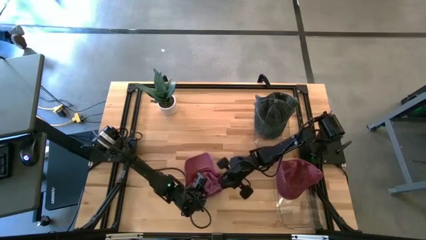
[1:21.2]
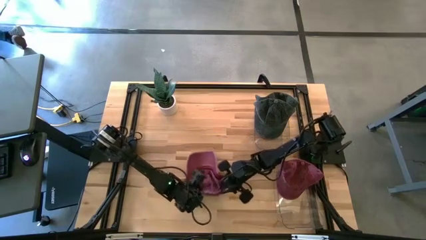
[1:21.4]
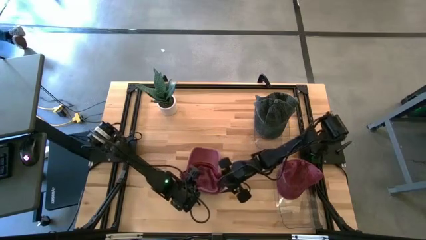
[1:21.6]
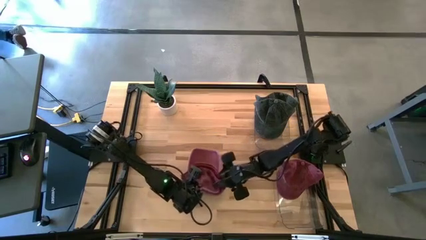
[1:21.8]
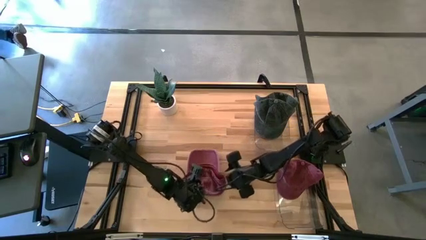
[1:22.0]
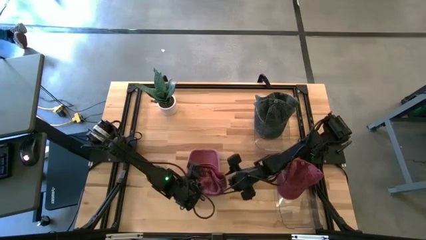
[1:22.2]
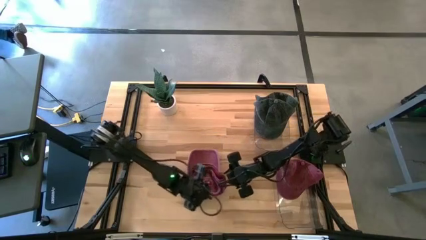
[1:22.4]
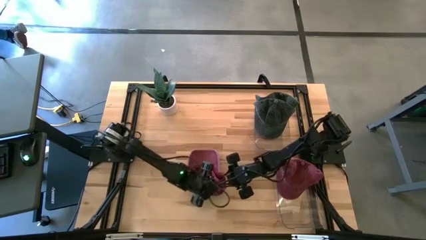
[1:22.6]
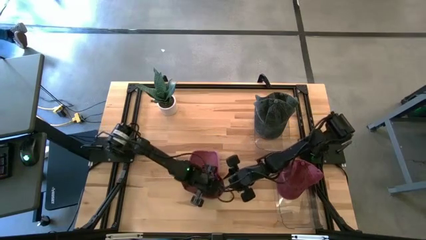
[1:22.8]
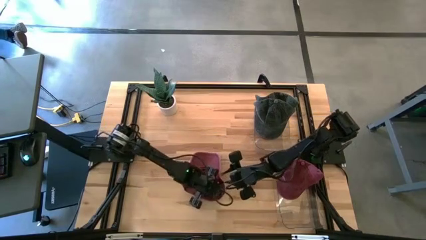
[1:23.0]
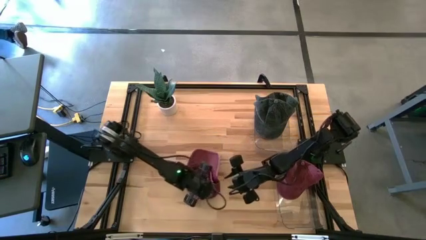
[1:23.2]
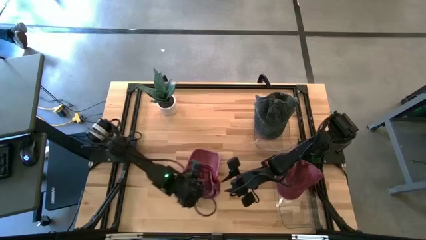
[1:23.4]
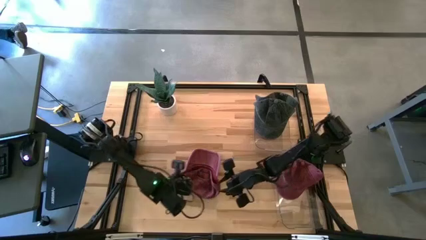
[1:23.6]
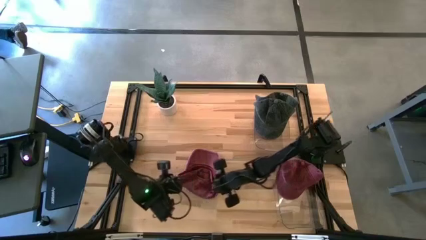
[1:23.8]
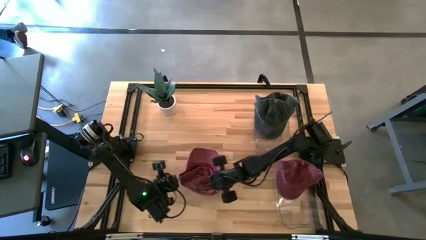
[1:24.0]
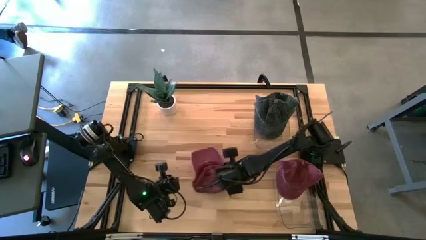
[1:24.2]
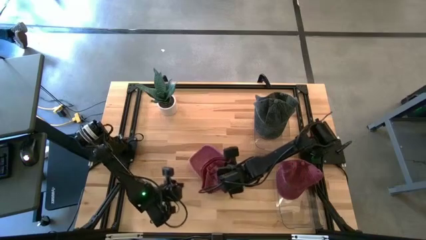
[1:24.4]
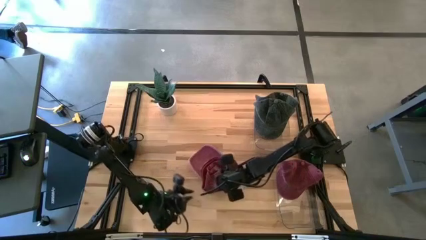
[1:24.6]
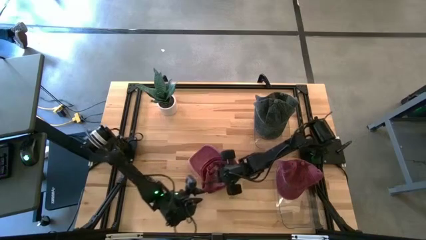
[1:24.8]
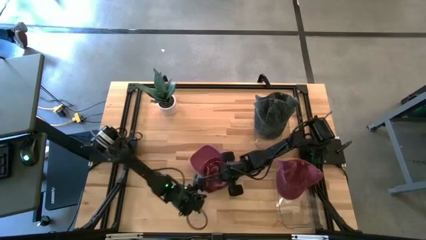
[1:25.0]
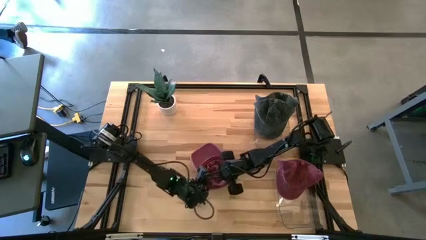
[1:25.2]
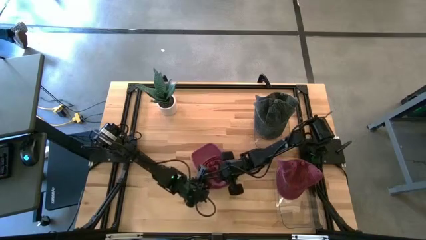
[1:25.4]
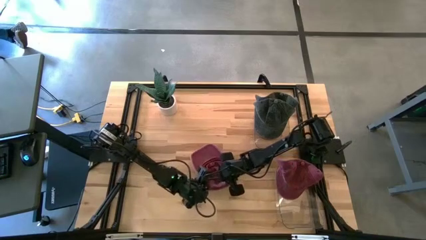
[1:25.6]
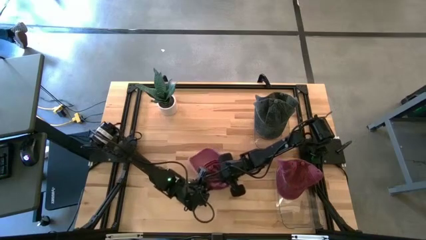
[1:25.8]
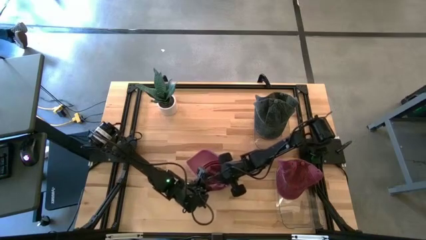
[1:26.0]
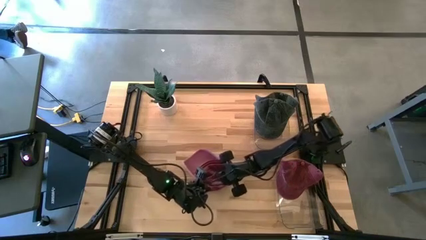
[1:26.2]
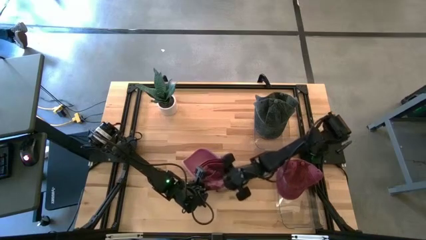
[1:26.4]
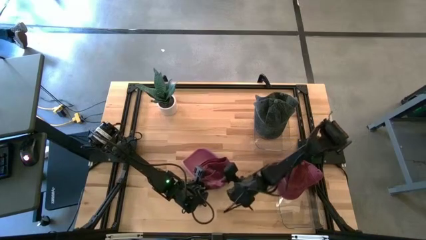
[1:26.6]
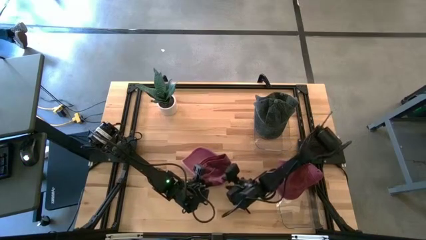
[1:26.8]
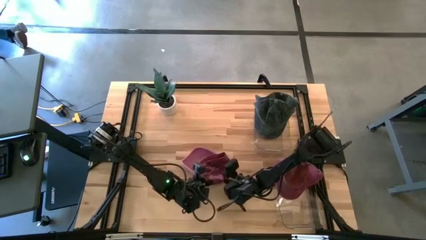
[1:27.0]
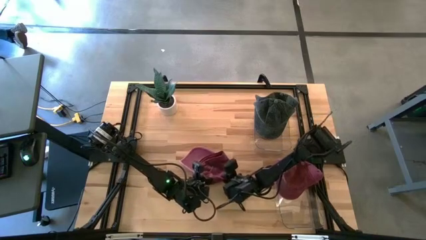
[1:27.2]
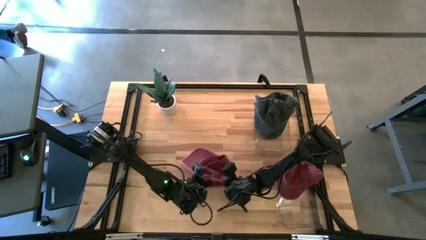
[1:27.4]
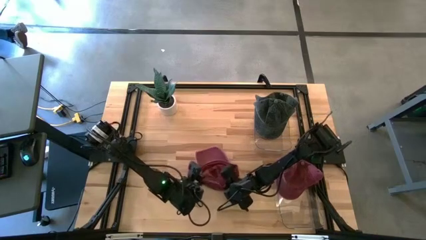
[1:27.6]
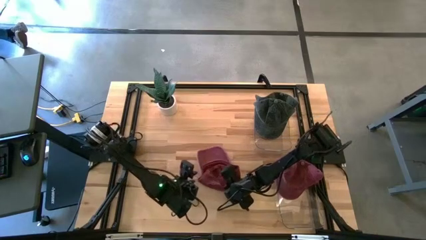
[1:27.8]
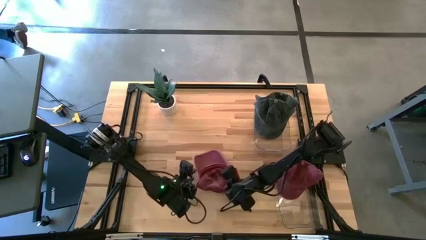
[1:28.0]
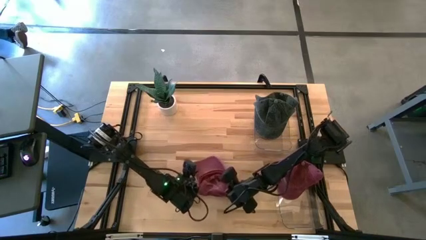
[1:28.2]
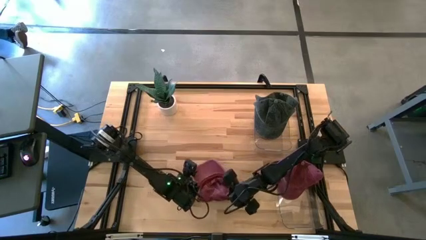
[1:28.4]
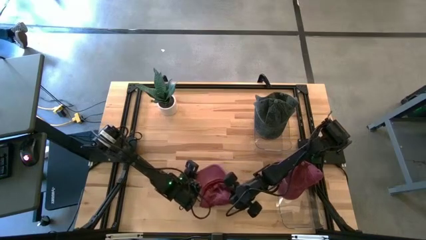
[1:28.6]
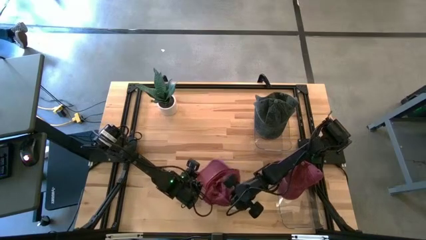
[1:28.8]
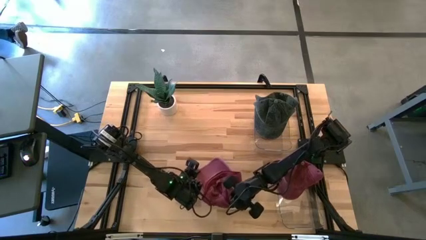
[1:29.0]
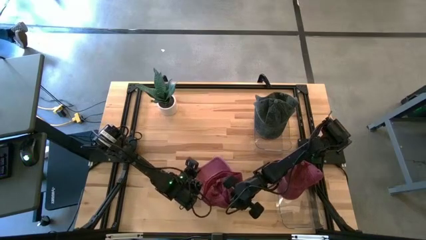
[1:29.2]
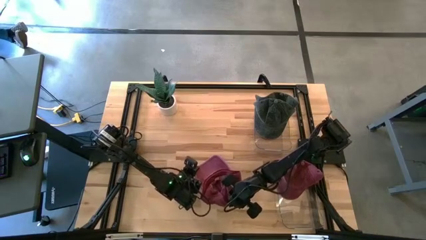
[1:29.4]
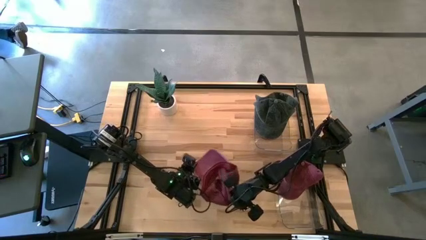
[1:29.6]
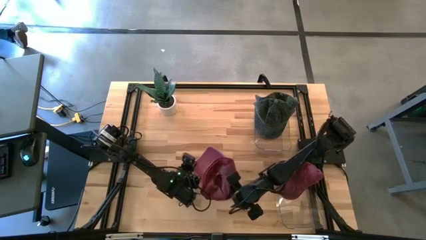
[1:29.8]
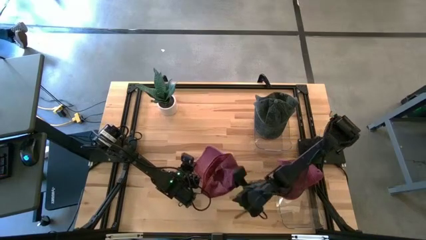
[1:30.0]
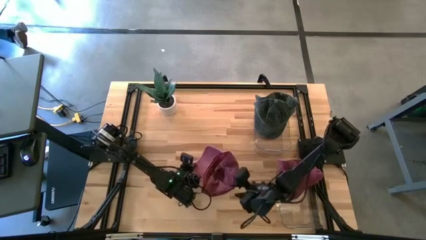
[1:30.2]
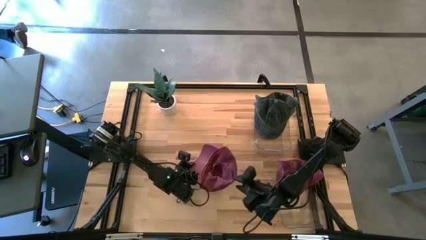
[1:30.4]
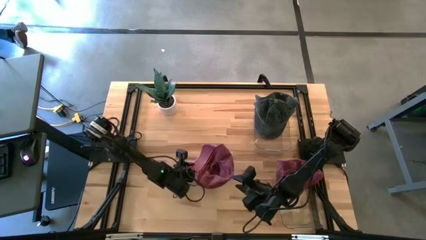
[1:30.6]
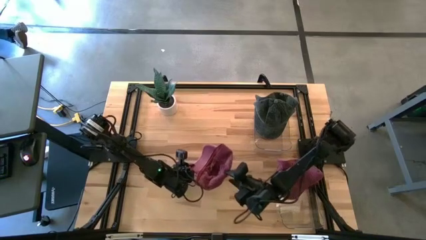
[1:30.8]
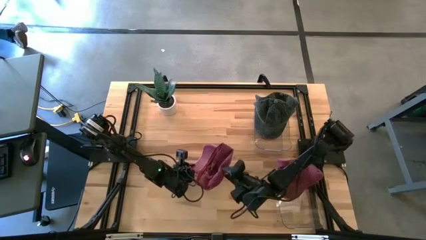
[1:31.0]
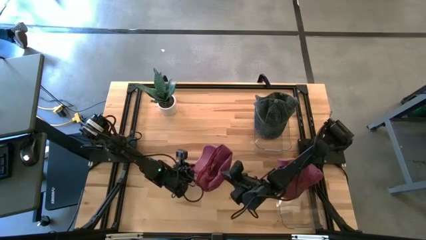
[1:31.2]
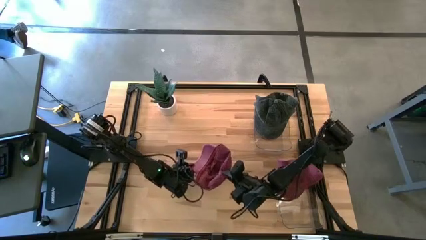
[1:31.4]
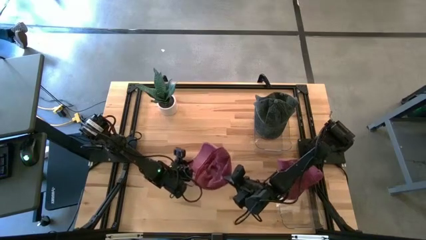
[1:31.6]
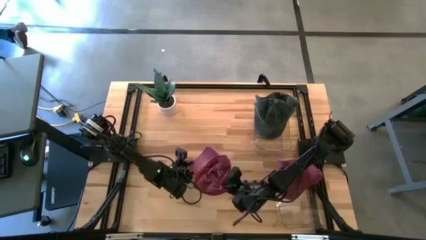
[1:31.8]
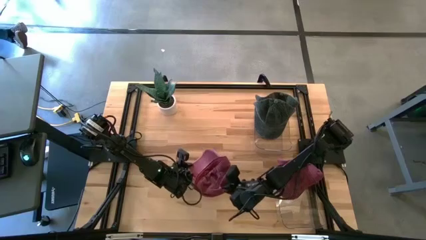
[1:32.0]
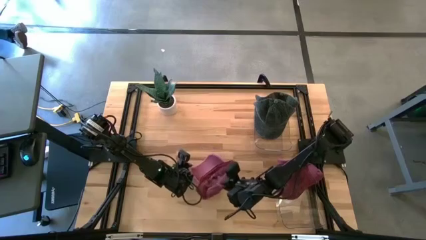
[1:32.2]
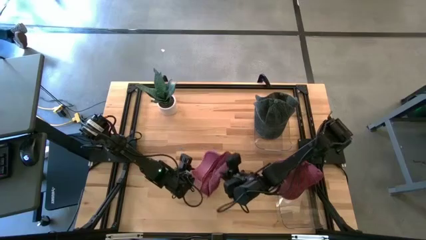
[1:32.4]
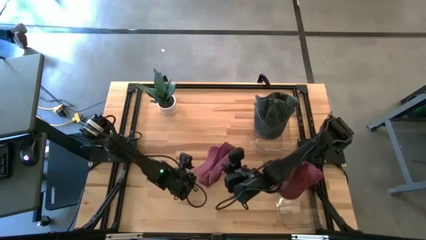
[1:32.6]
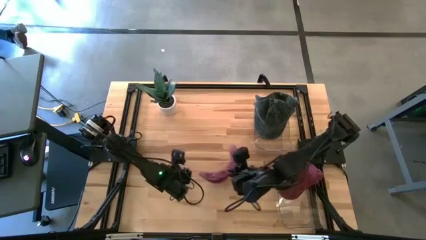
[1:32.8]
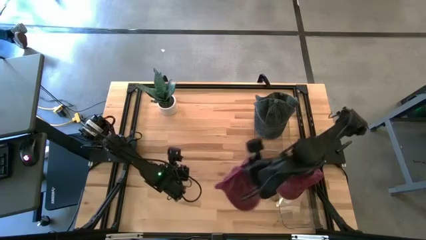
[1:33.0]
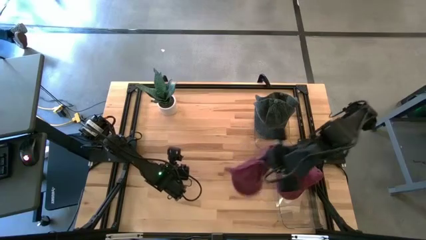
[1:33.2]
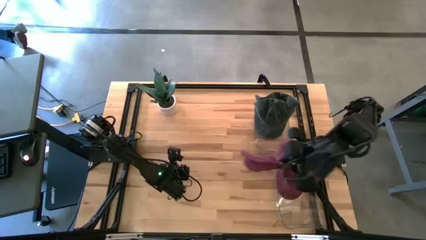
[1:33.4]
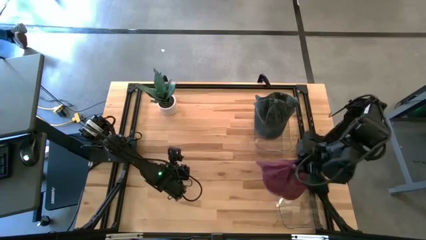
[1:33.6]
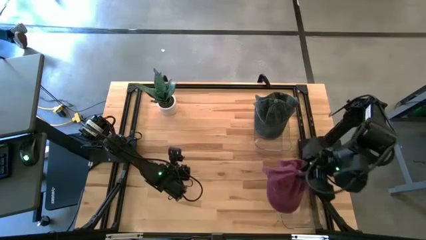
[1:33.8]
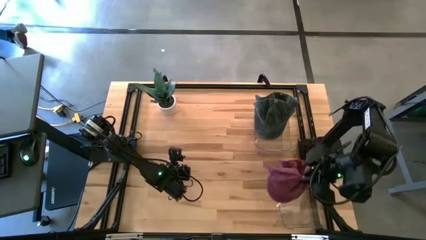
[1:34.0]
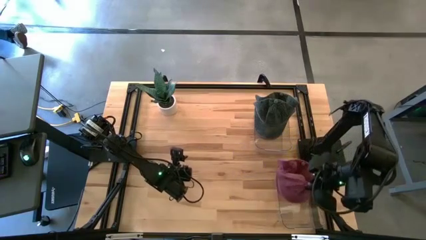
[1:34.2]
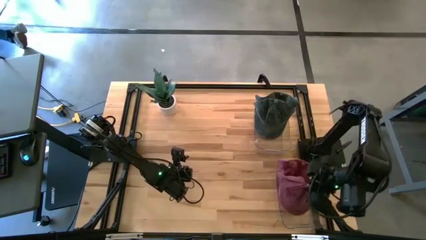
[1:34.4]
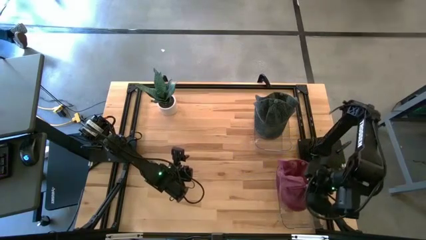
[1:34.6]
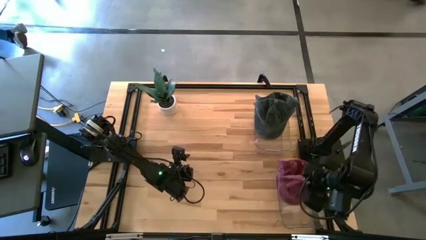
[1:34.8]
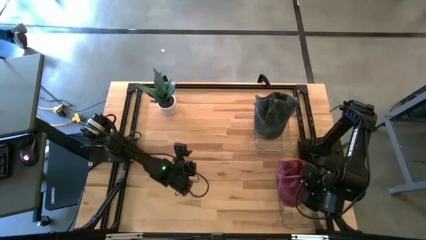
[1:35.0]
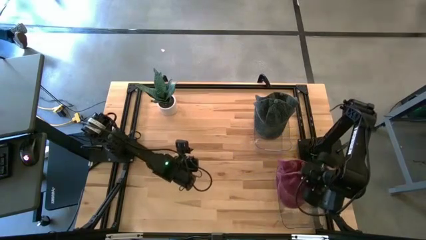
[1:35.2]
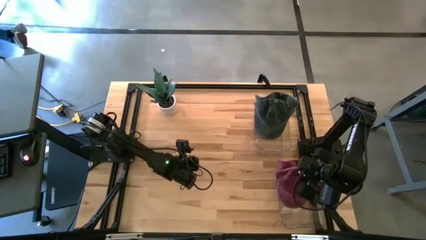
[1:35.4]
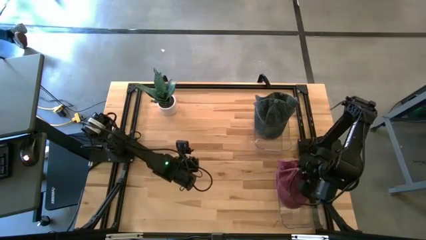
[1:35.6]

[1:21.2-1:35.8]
Task: Pick & Place hat
Put the red cap into the bottom transparent bin
